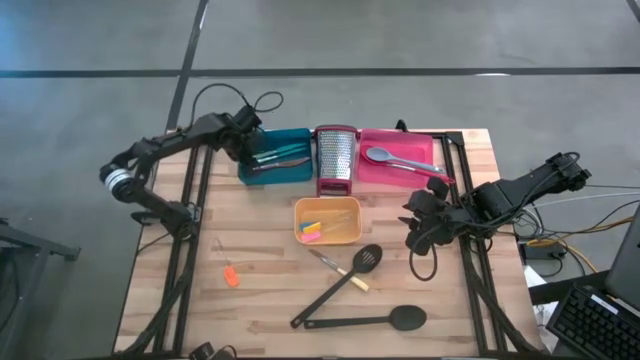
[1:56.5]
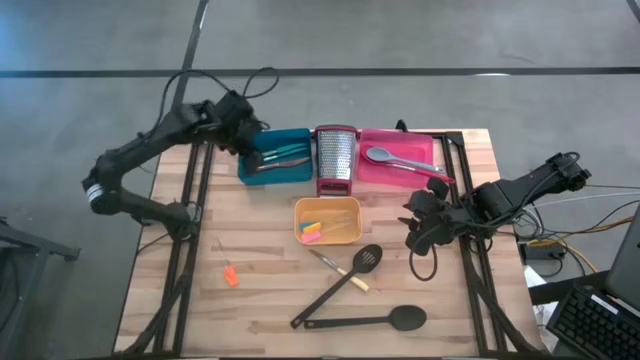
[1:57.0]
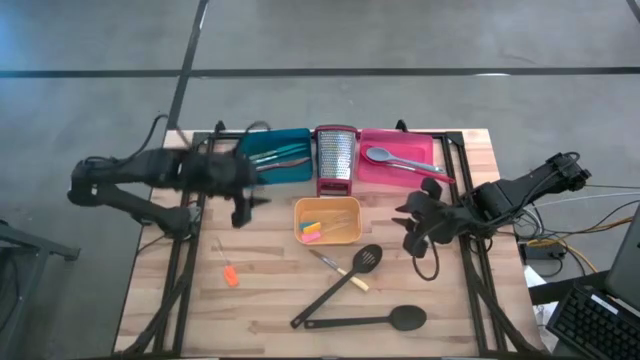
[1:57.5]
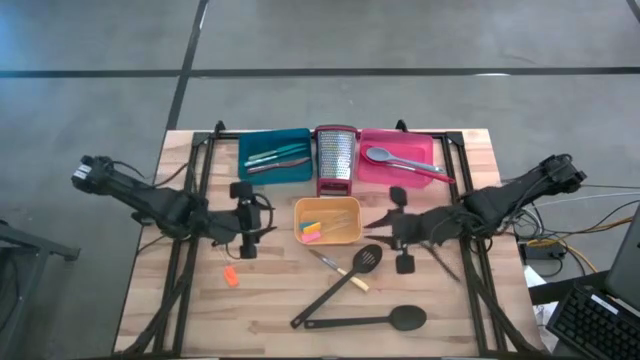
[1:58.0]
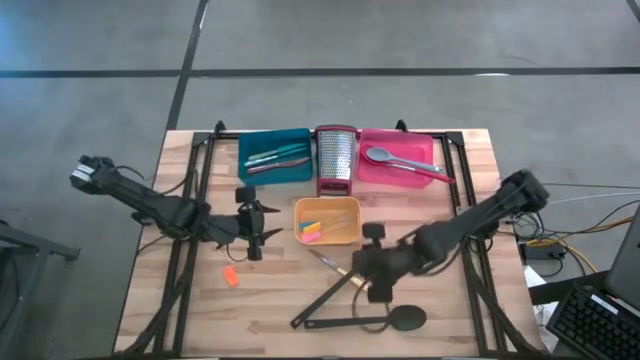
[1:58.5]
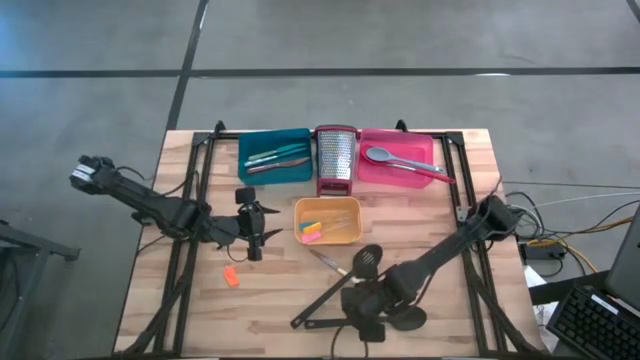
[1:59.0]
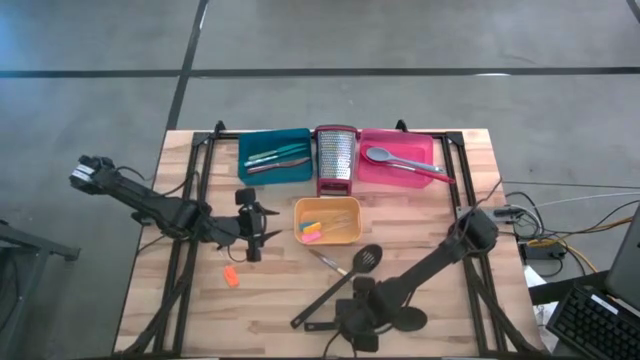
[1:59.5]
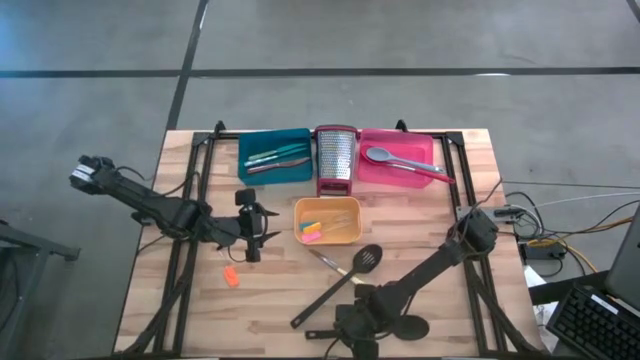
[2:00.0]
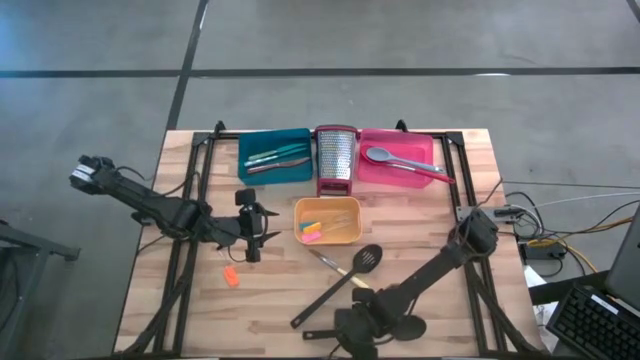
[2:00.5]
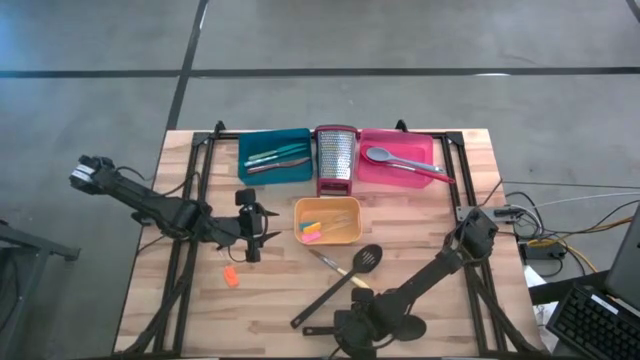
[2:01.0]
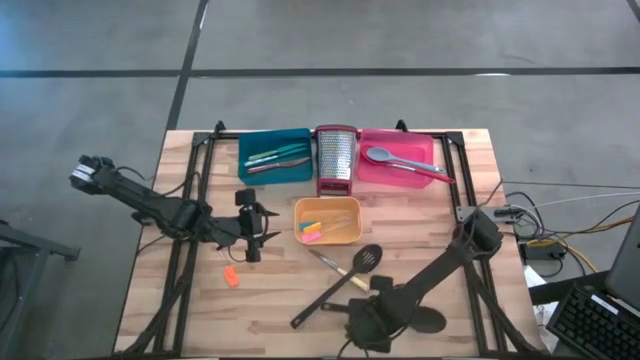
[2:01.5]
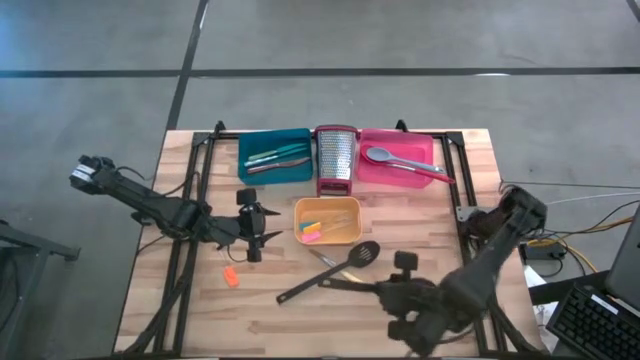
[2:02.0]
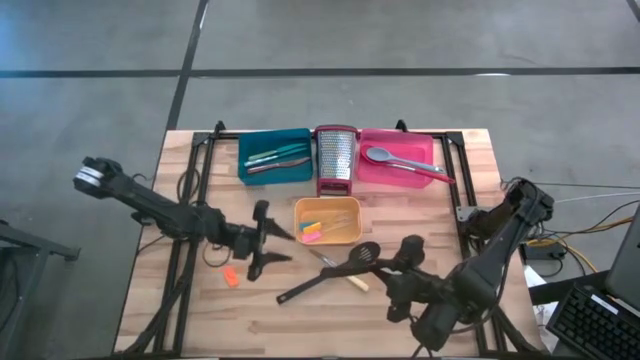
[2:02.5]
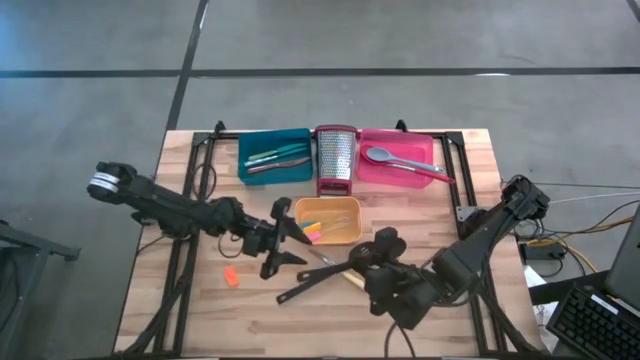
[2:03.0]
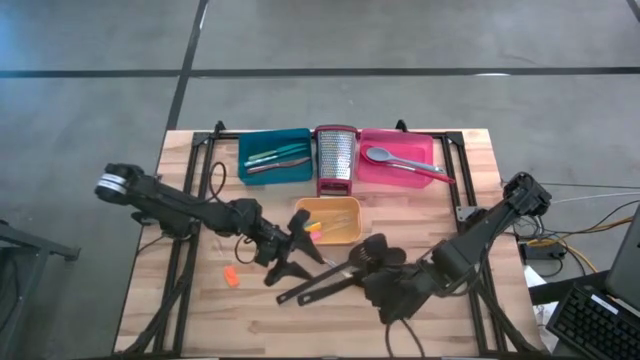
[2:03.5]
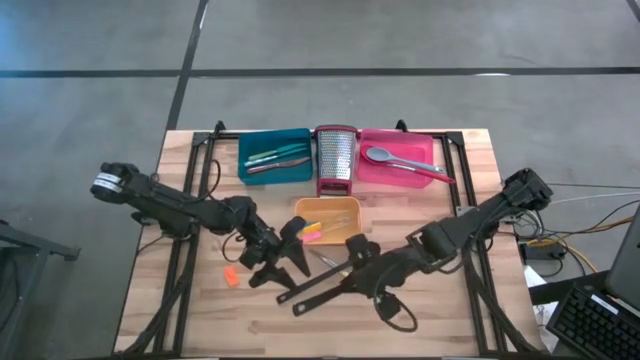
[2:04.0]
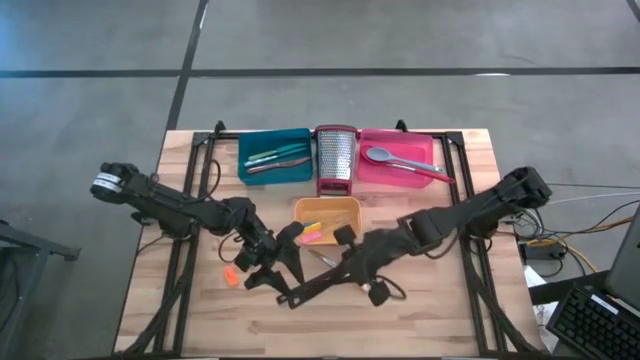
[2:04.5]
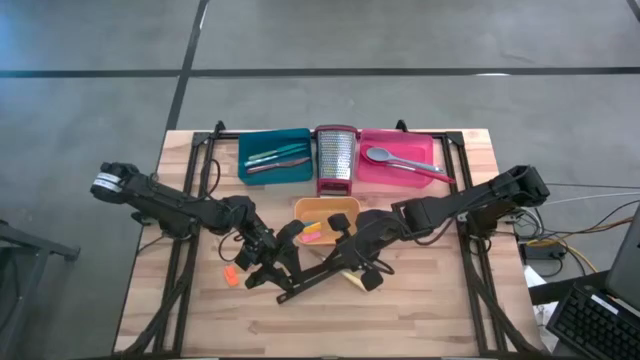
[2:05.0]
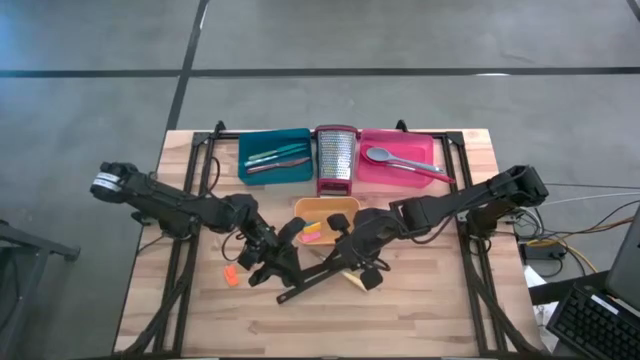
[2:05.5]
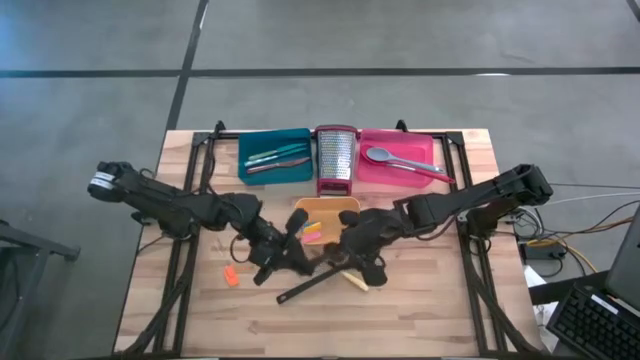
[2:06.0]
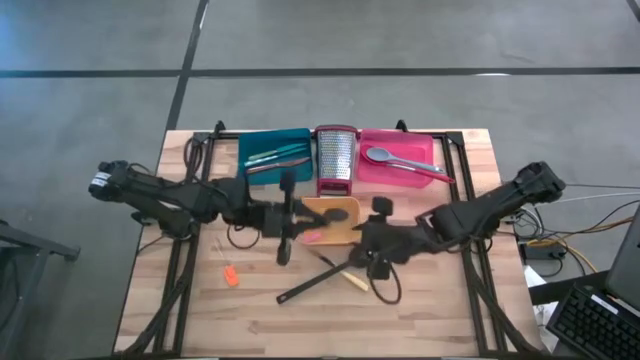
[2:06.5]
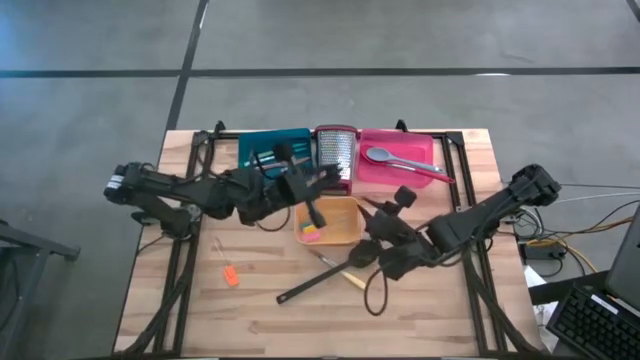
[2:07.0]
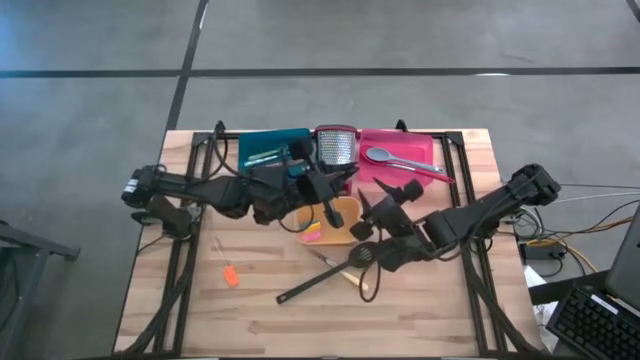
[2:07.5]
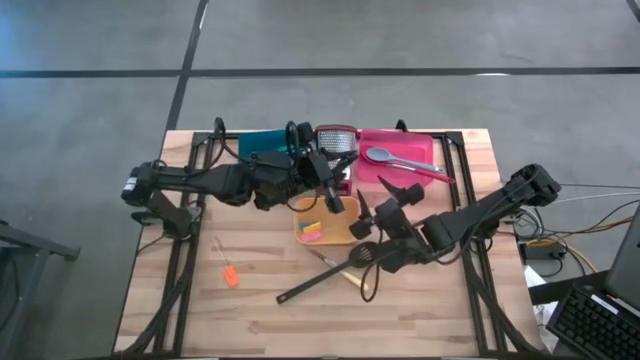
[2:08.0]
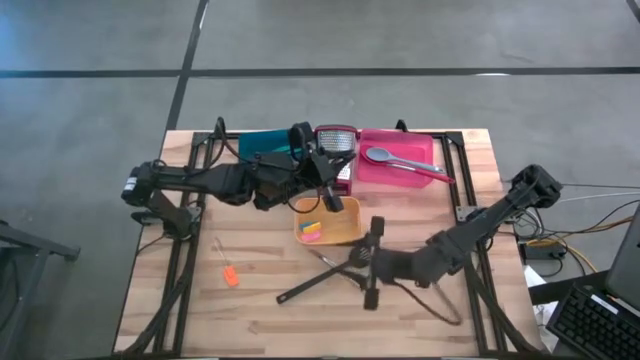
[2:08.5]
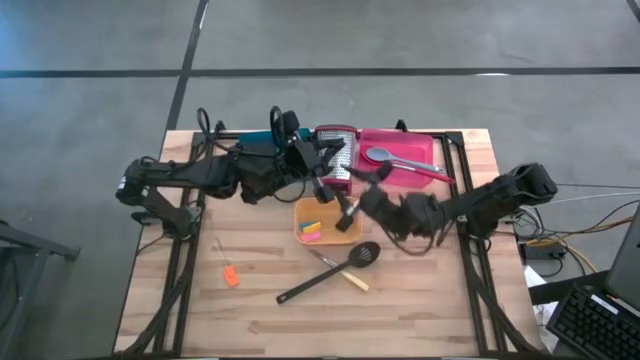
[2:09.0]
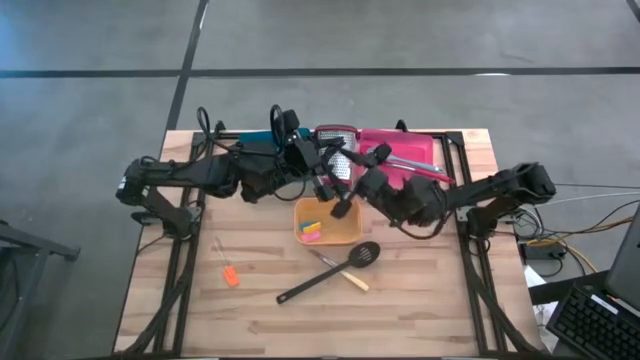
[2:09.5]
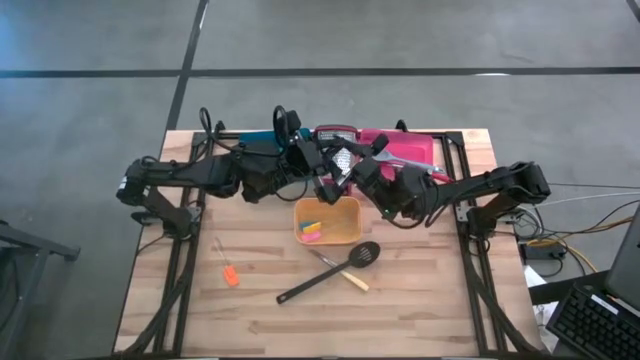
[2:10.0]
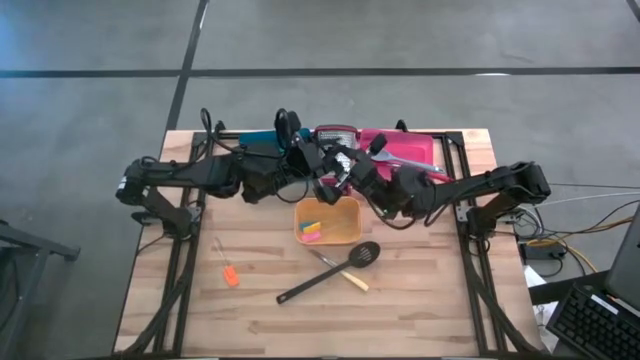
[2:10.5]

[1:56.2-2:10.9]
Task: Pick & Place Kitchen Items
Put the black serving spoon into the pink bin

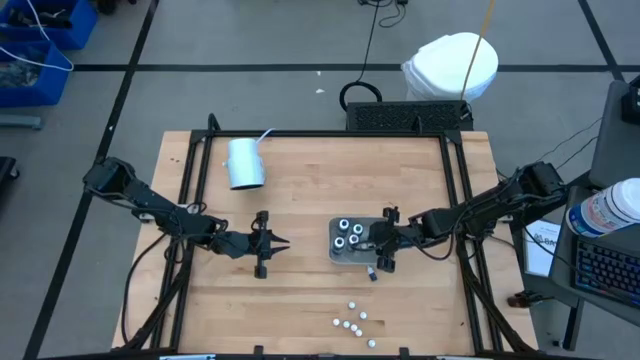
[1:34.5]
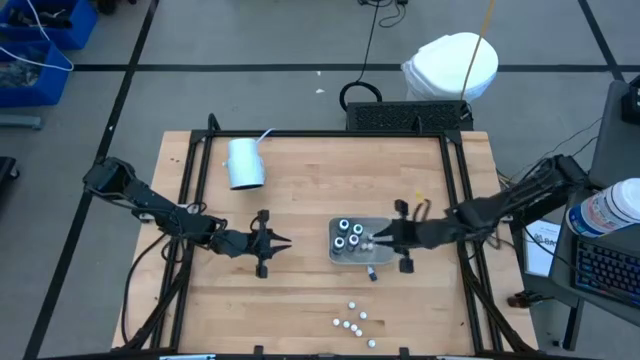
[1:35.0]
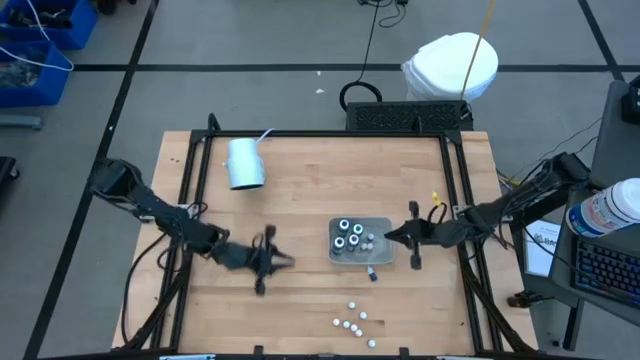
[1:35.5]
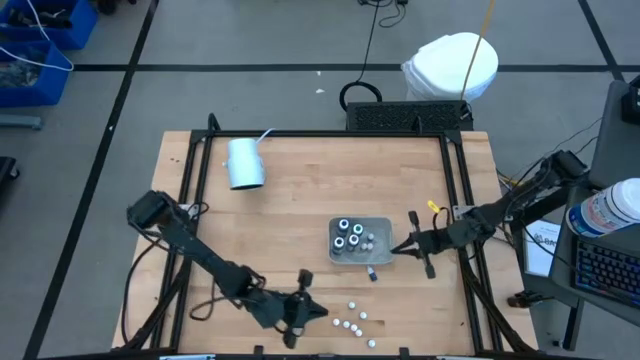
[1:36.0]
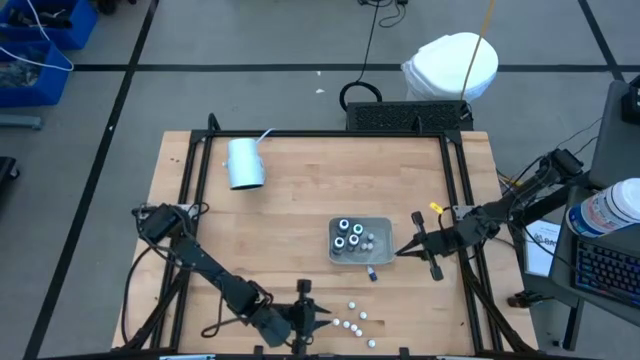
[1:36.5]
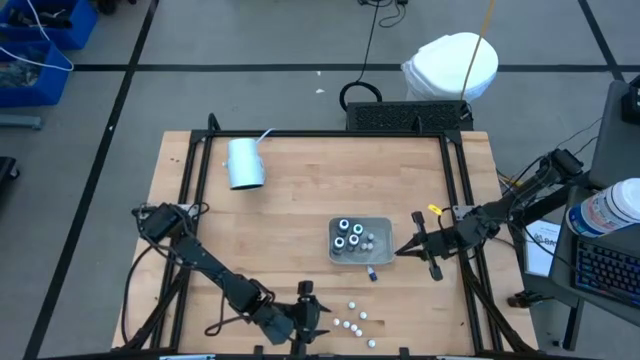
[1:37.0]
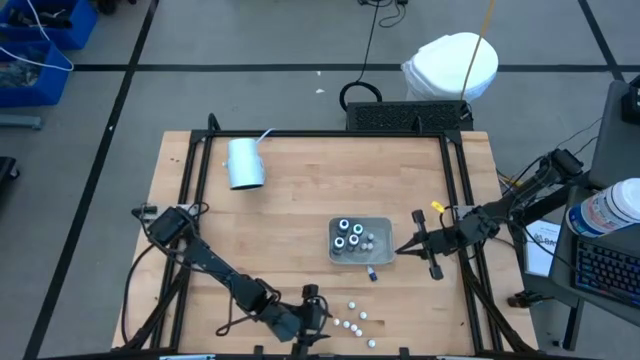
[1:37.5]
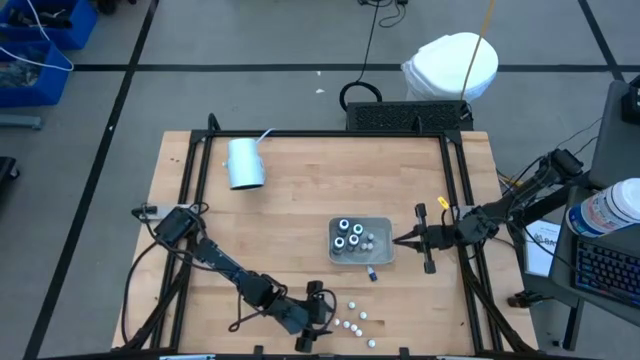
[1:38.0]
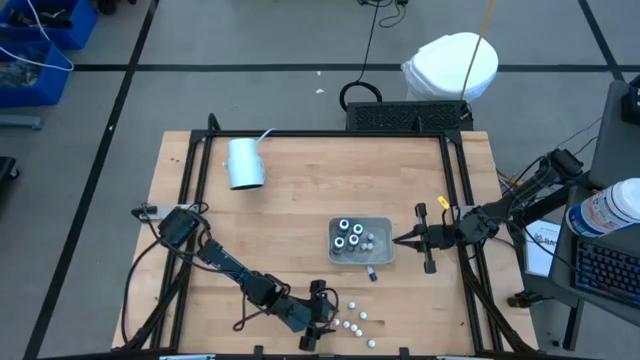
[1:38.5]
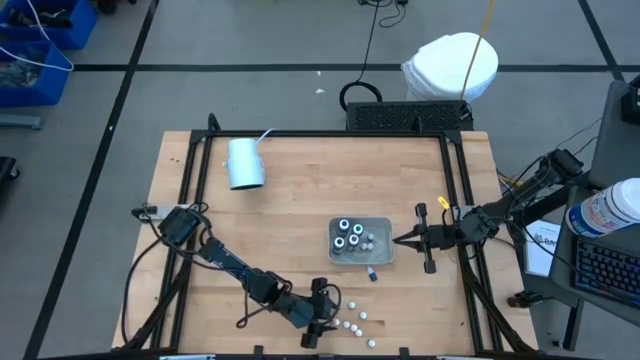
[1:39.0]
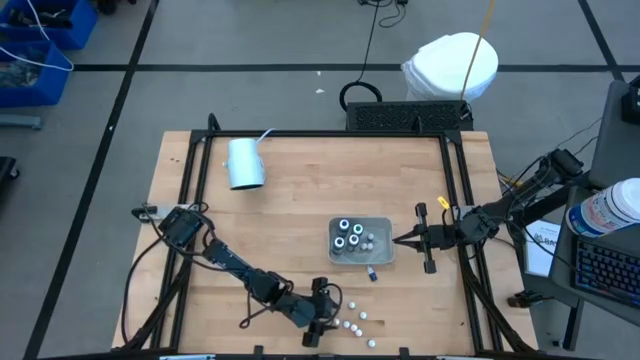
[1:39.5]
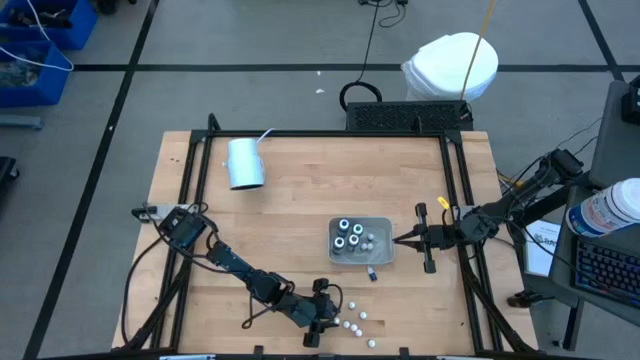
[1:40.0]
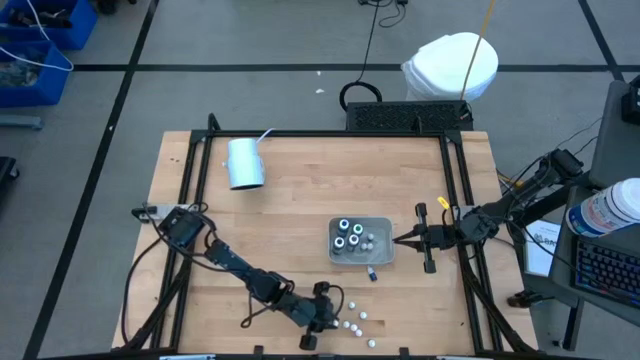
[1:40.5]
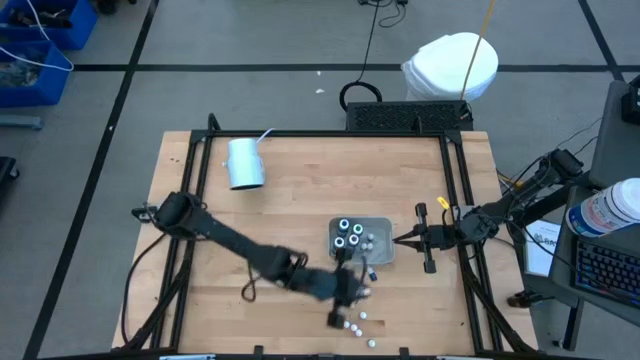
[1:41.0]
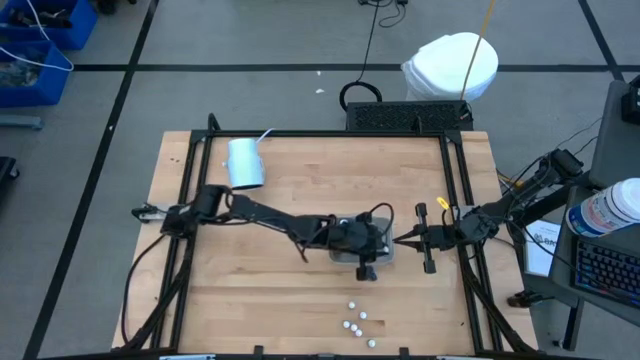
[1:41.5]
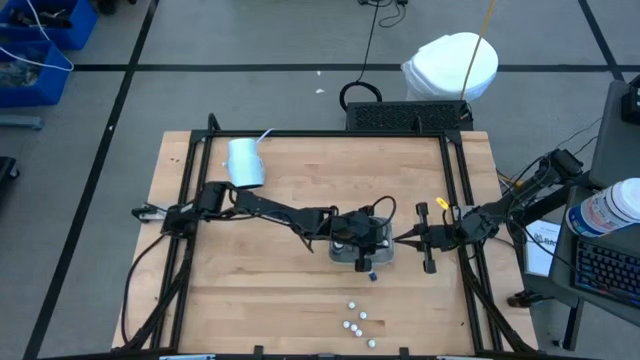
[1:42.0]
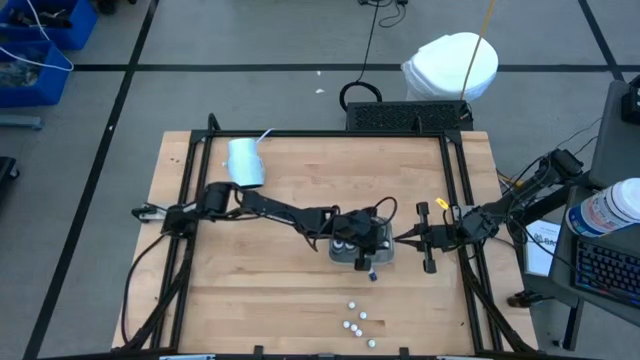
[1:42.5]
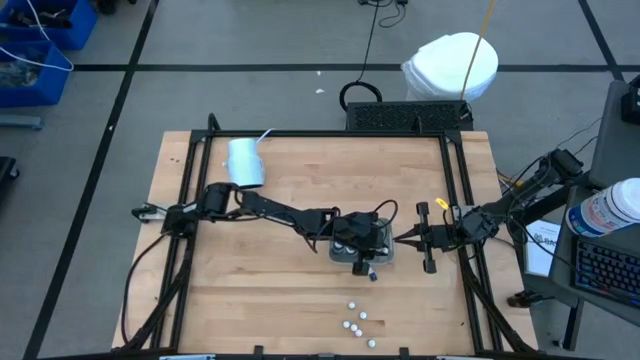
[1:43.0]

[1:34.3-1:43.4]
Task: Pick & Place food coloring
Put the orange food coloring bottle into the gray bin
